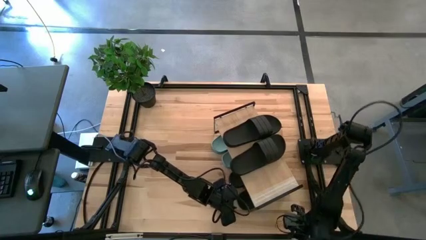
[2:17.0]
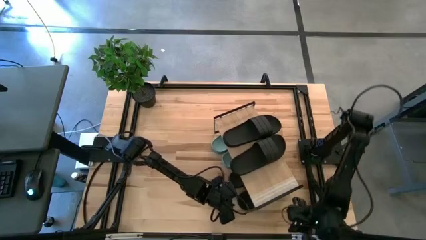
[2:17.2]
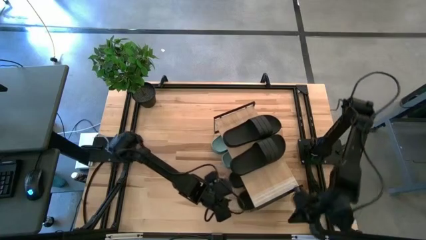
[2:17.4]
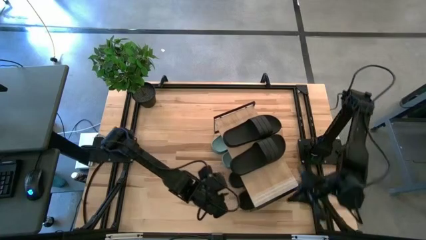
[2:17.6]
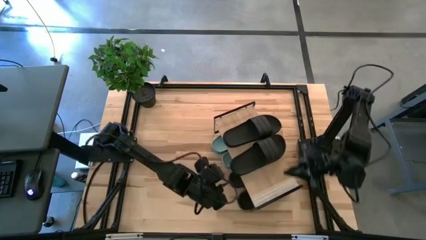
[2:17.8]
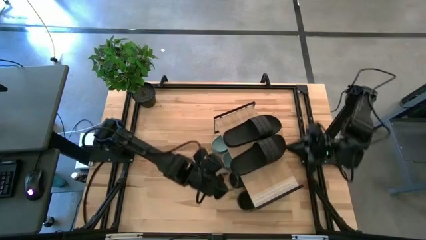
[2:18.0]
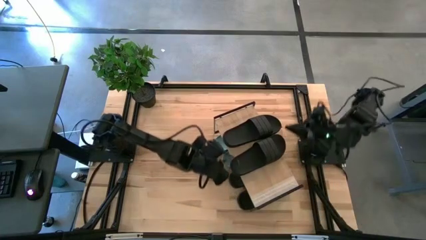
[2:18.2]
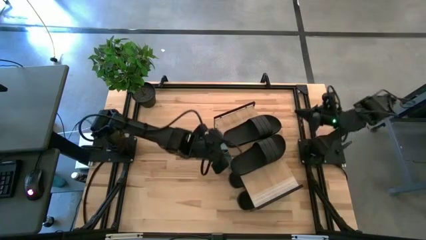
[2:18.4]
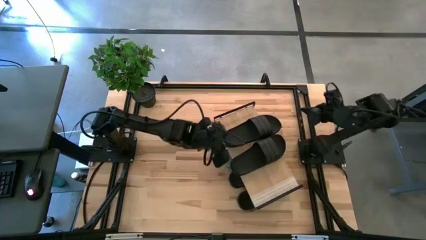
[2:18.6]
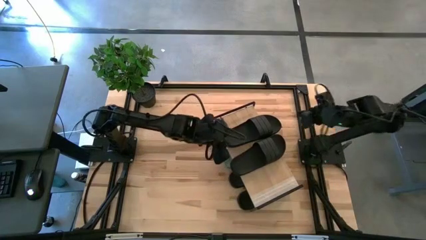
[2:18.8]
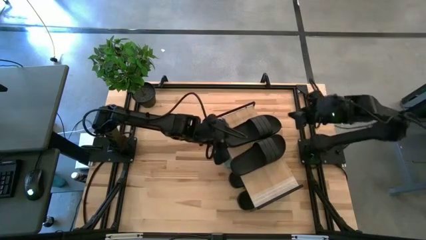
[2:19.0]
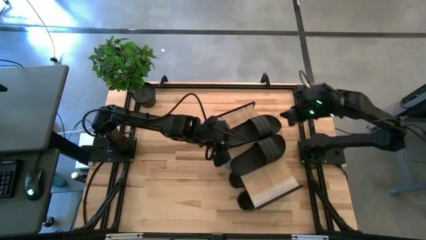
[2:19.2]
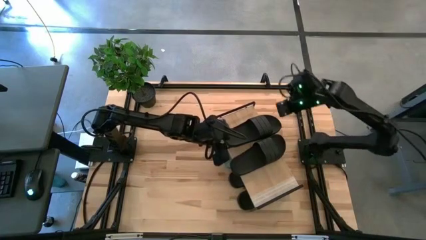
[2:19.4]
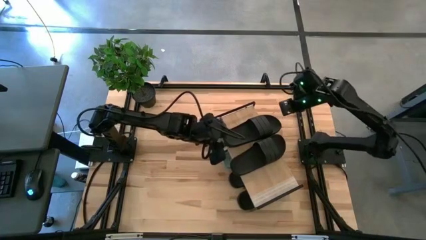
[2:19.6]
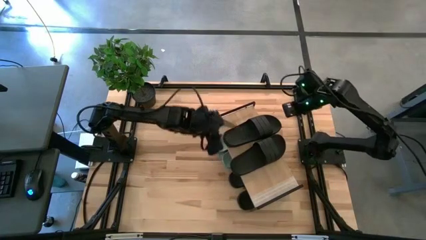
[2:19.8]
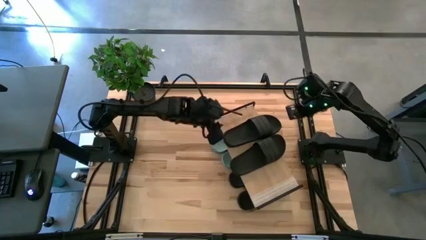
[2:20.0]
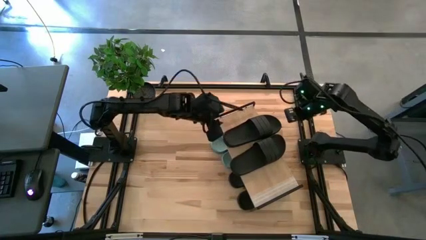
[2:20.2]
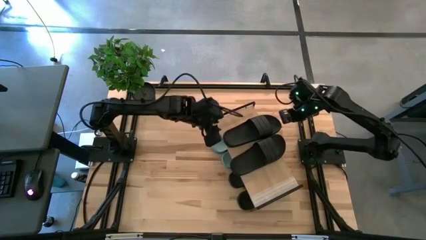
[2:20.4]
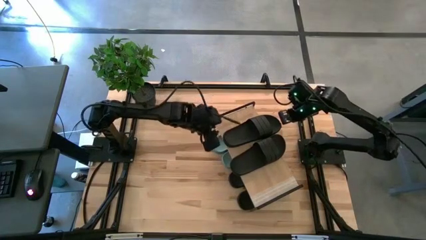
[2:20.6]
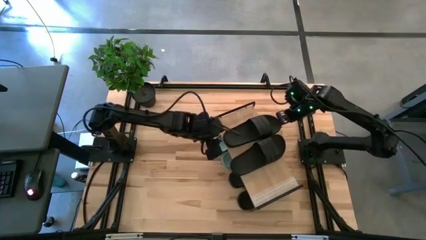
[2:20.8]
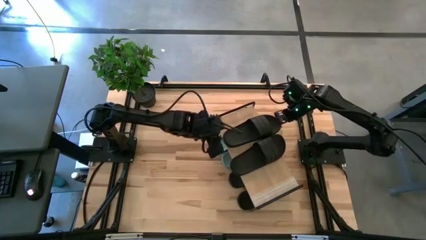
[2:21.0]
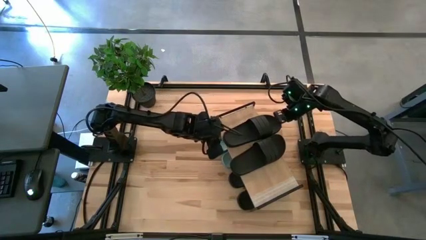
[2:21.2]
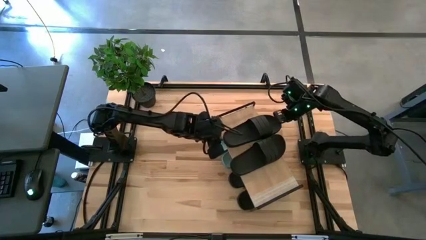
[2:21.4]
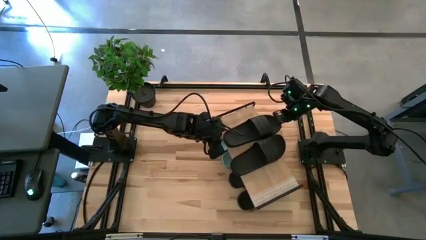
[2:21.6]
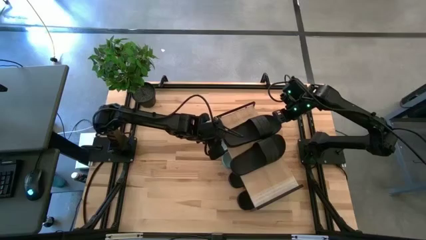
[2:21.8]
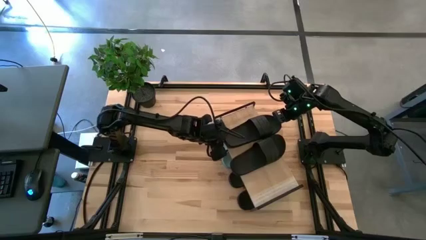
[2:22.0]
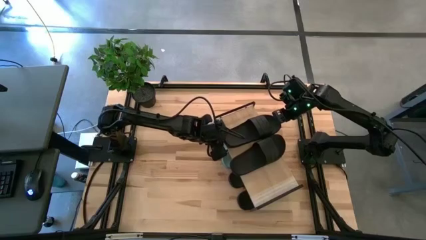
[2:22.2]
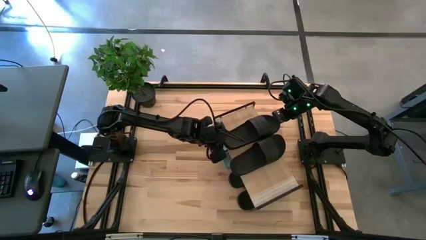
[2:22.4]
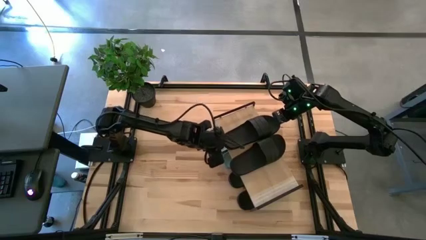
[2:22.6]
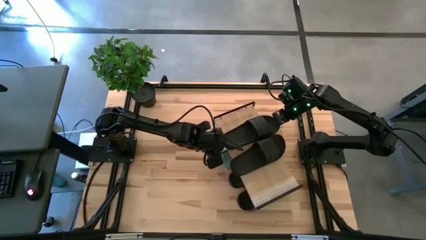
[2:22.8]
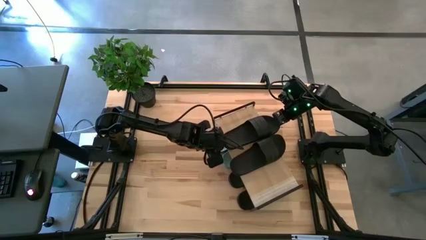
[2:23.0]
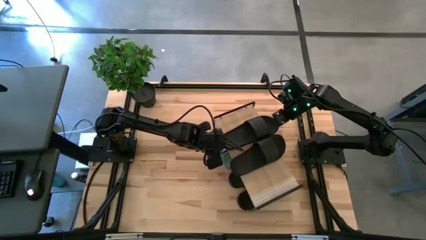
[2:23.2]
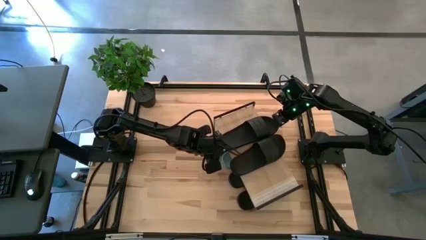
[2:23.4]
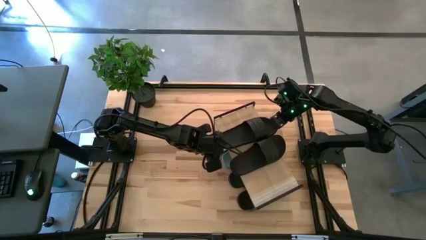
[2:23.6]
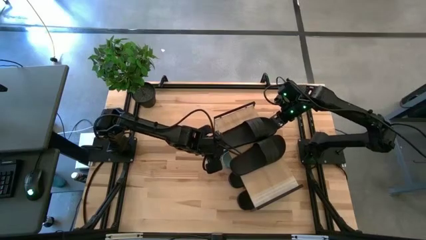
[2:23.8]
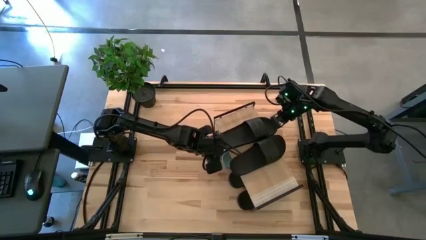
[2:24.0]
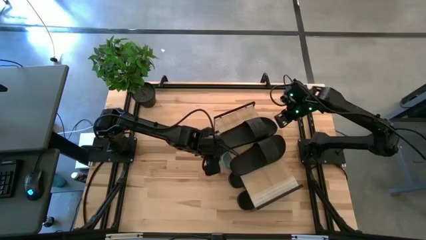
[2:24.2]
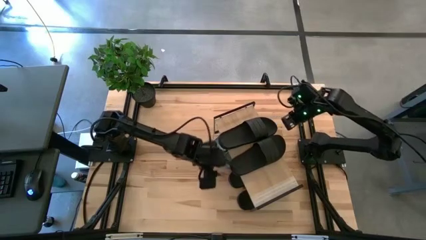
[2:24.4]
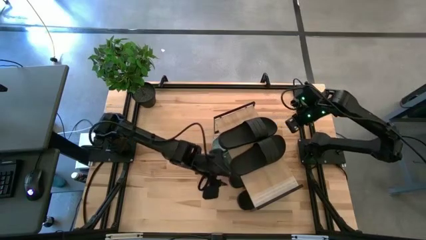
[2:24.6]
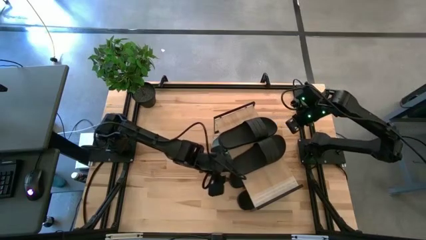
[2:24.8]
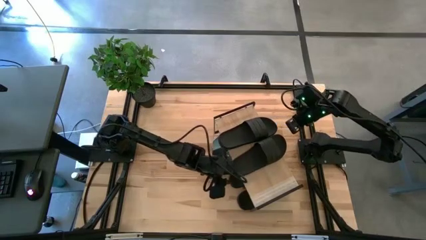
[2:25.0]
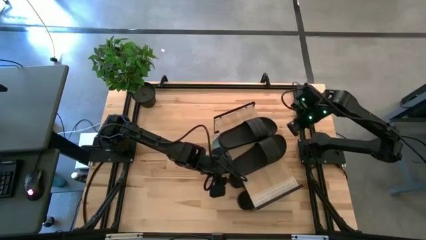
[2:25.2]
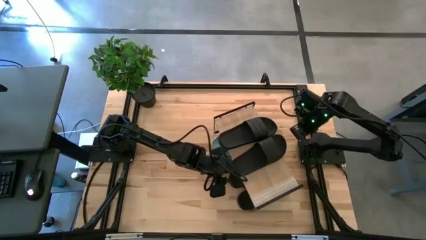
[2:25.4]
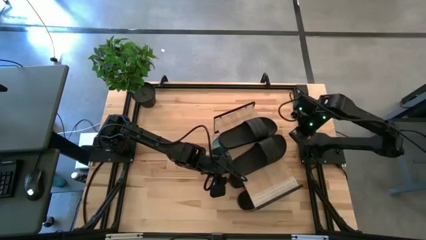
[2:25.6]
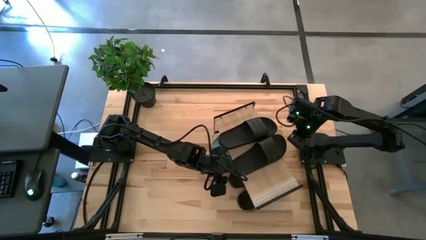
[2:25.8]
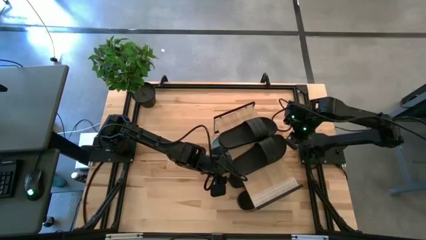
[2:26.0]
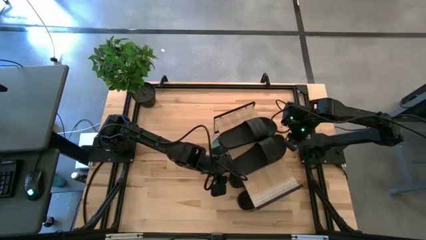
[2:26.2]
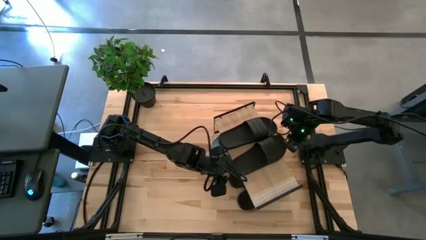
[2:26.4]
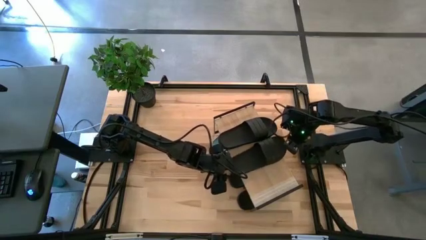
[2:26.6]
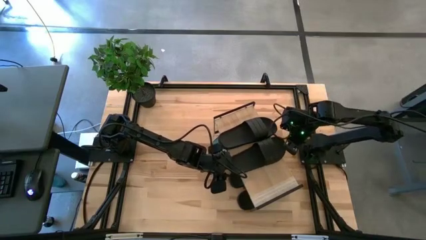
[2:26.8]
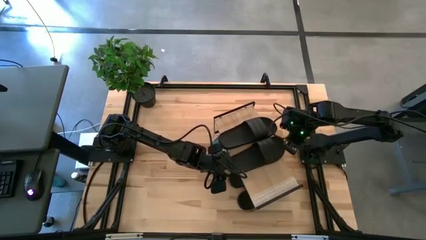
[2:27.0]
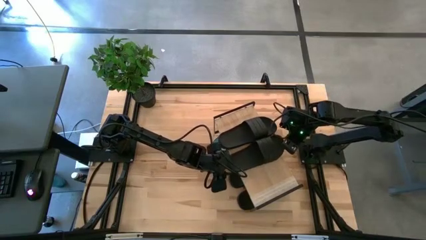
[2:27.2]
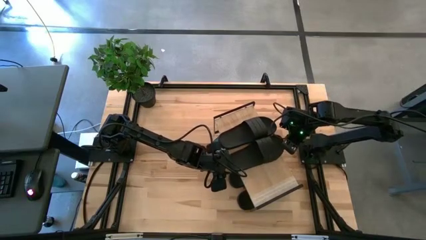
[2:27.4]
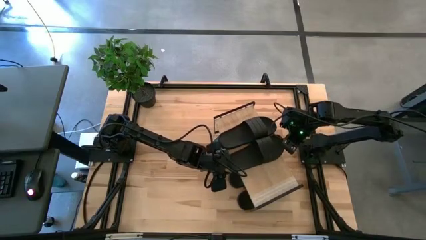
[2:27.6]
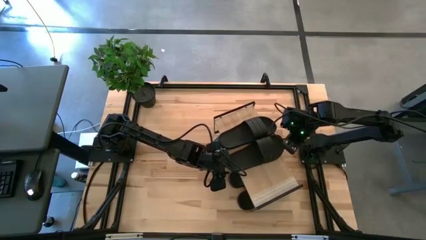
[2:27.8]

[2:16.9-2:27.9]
Task: Pick and place slides into the shelf
Adjust the pair of black slides on the shelf

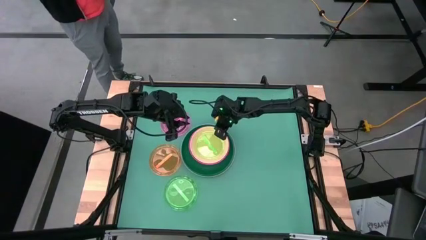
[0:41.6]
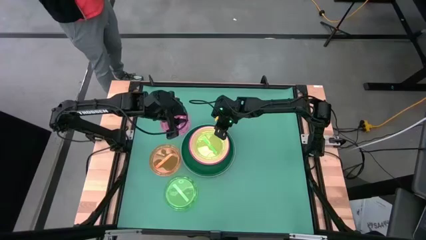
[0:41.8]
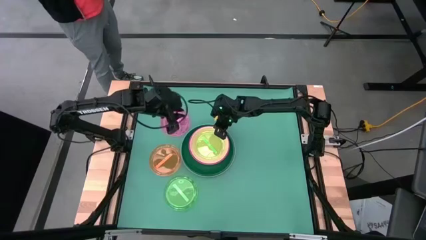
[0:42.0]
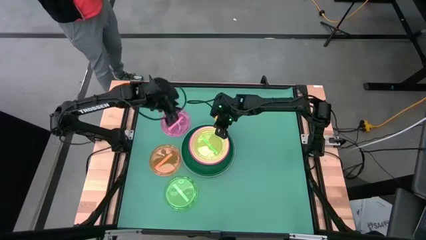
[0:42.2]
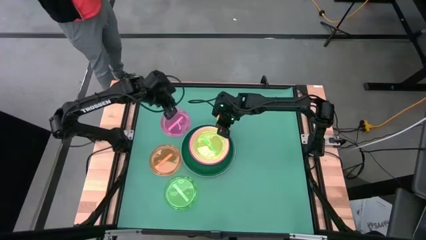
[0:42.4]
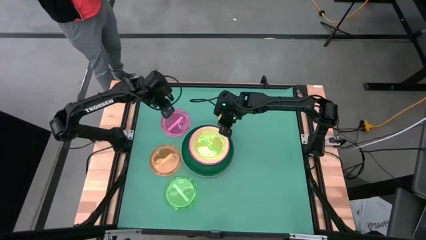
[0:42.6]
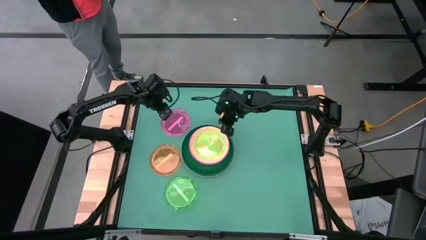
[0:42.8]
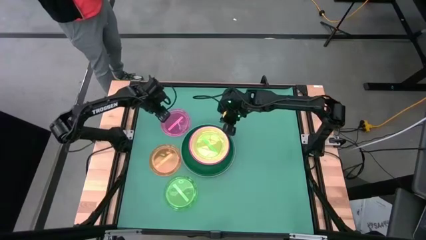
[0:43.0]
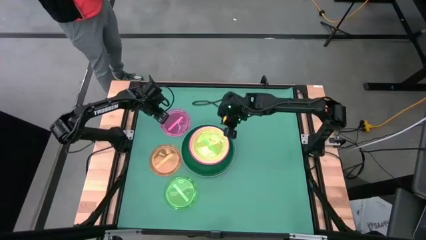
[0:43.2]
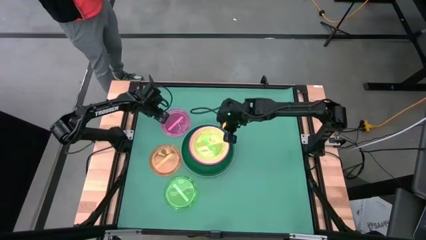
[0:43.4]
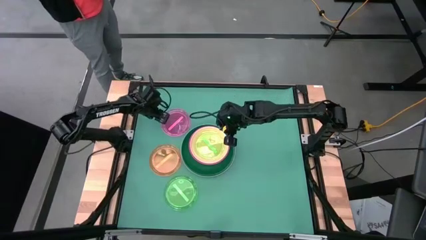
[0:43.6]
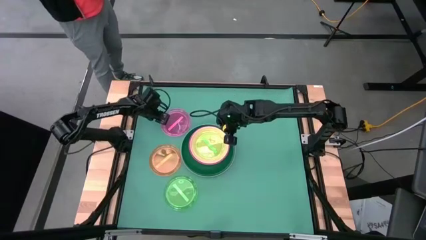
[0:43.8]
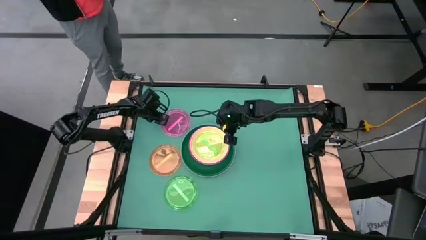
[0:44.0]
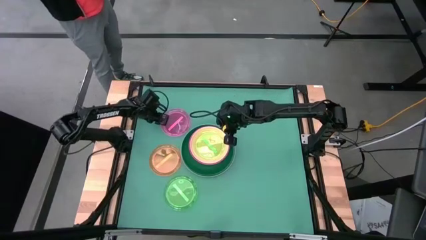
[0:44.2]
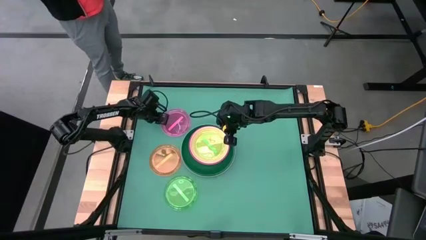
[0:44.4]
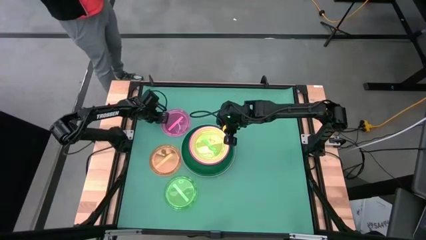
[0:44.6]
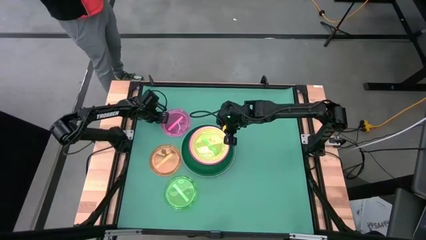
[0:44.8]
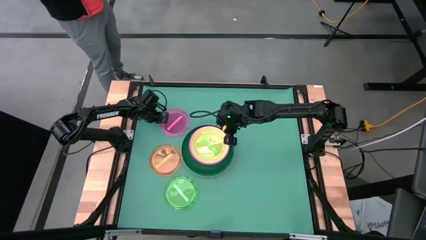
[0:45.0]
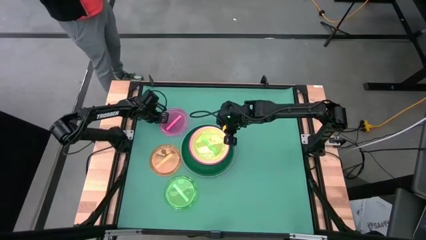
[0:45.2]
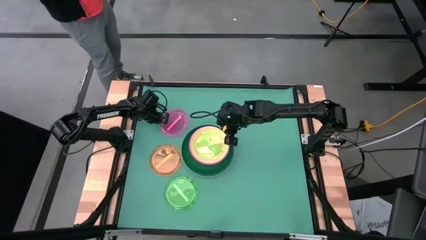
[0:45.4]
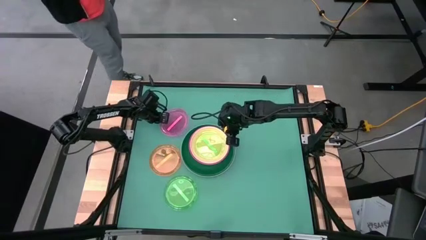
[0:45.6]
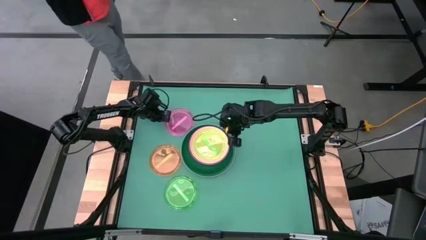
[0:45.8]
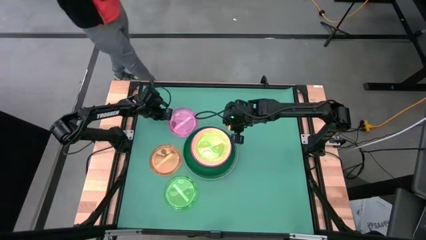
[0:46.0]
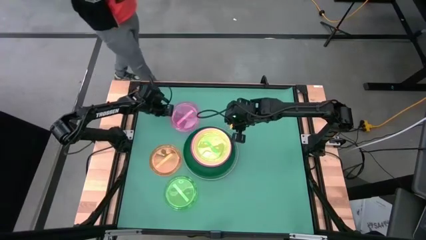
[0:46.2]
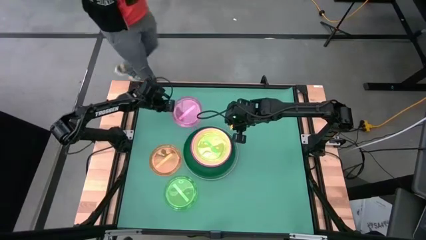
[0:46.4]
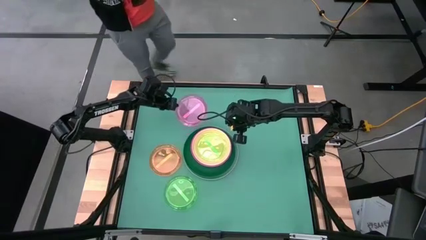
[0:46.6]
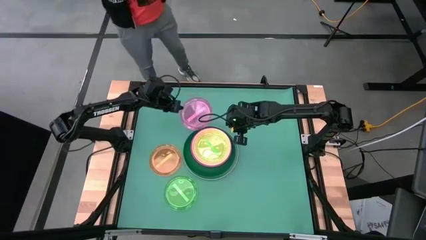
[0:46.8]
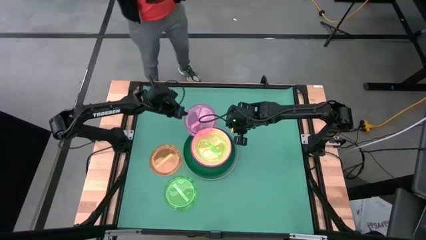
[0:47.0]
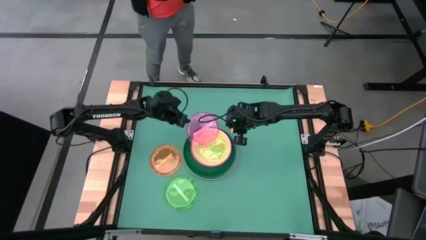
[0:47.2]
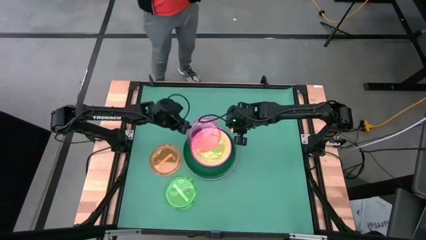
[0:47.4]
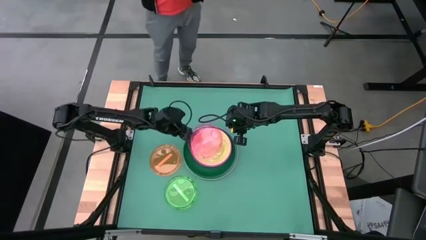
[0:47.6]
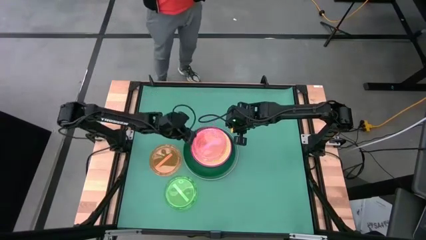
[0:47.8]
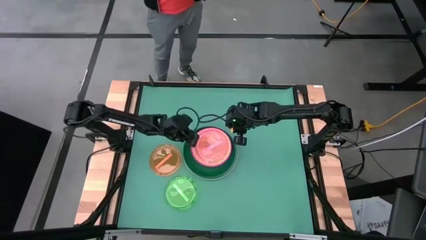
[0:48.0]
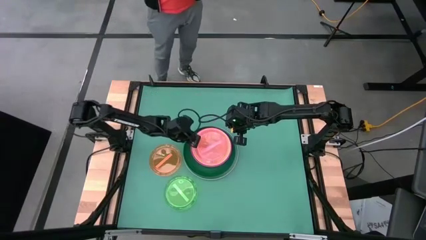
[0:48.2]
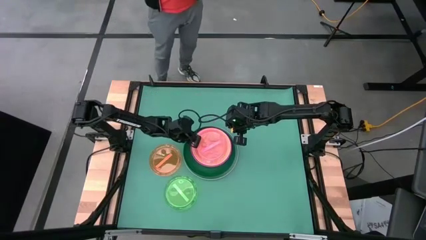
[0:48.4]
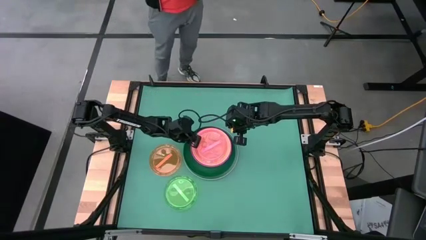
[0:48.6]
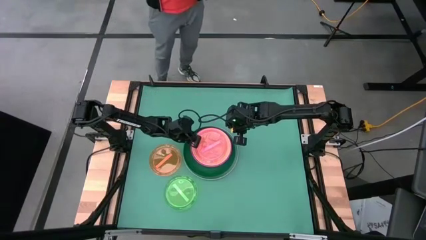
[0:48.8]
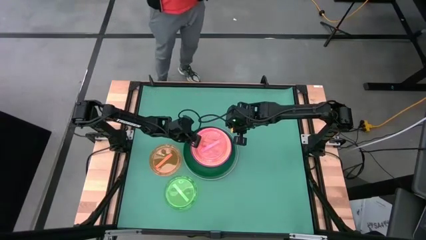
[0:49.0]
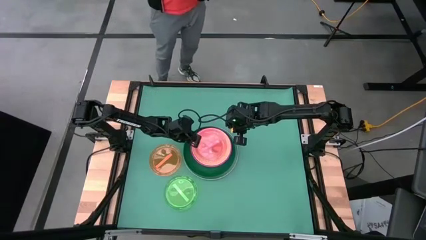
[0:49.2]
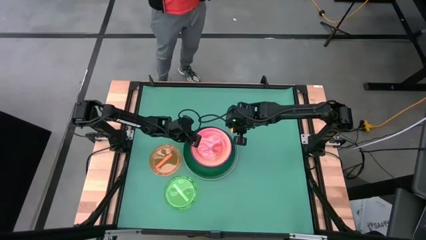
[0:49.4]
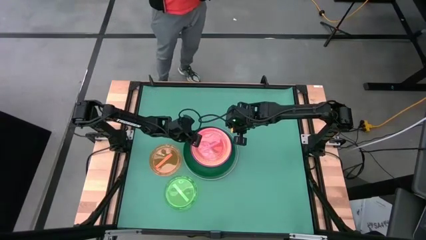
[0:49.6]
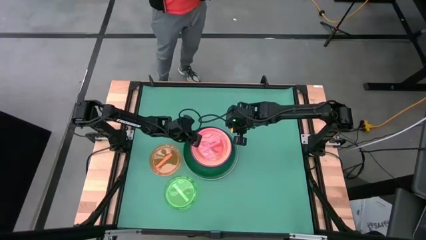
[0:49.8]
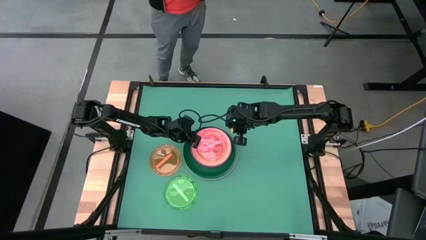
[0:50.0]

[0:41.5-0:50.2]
Task: Stack plastic plates
Stack the transparent pink plate on top of the transparent green plate
